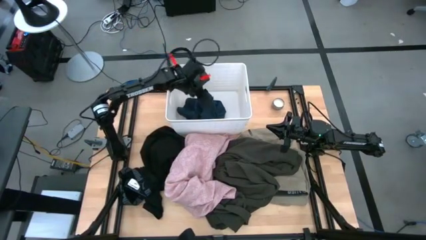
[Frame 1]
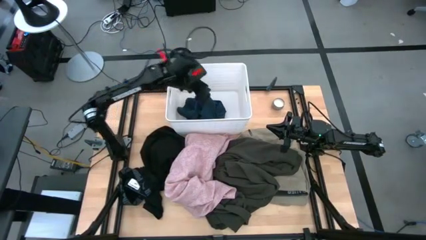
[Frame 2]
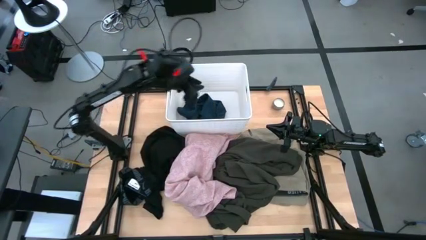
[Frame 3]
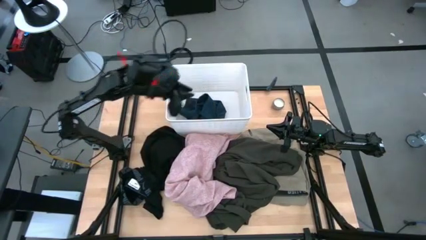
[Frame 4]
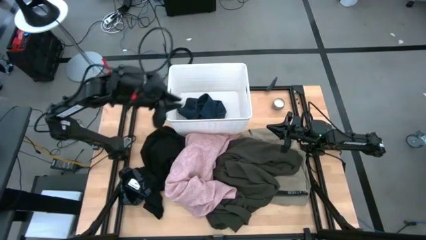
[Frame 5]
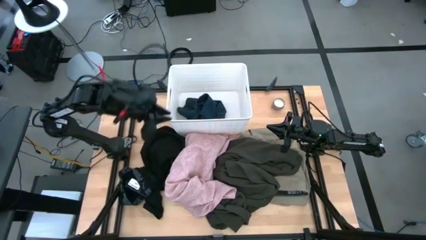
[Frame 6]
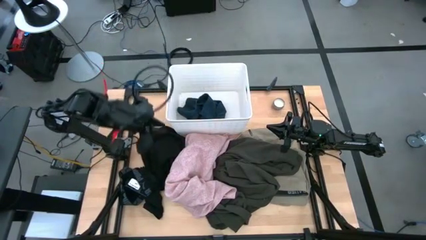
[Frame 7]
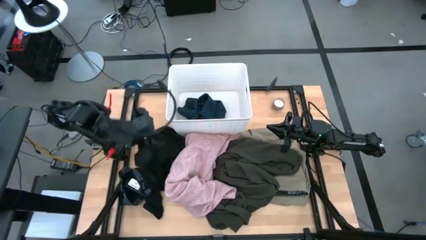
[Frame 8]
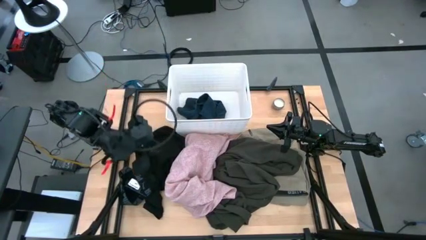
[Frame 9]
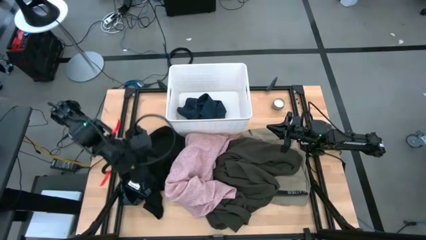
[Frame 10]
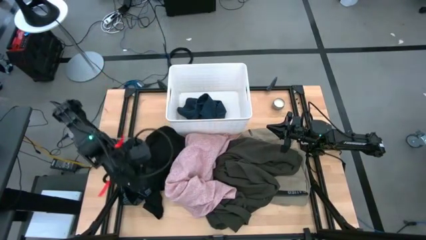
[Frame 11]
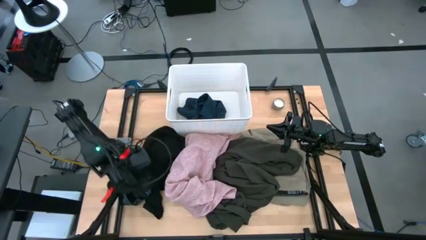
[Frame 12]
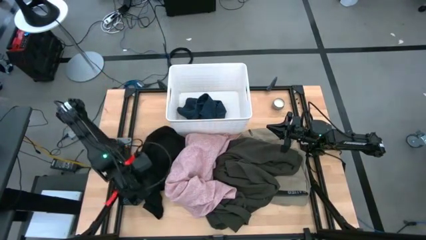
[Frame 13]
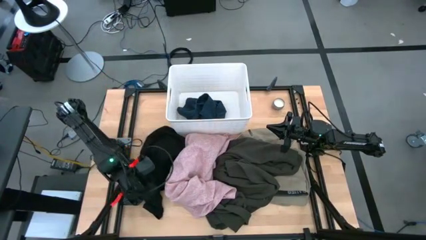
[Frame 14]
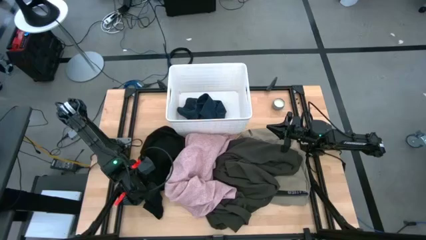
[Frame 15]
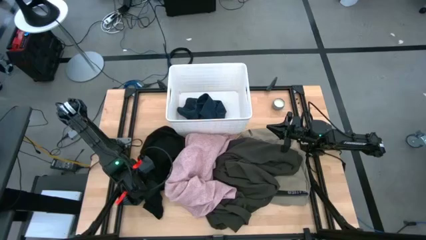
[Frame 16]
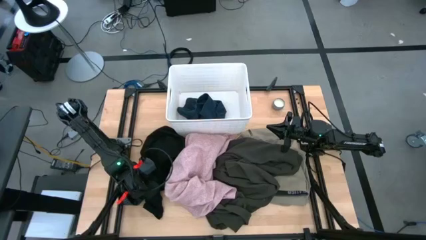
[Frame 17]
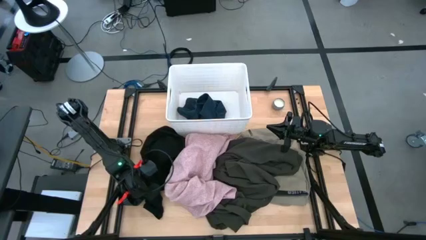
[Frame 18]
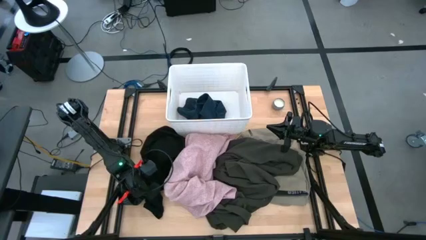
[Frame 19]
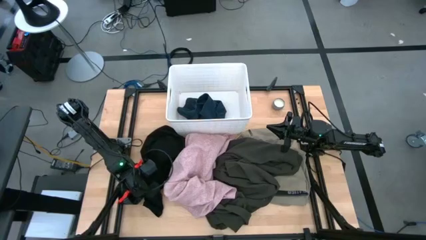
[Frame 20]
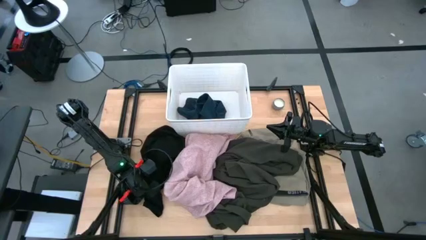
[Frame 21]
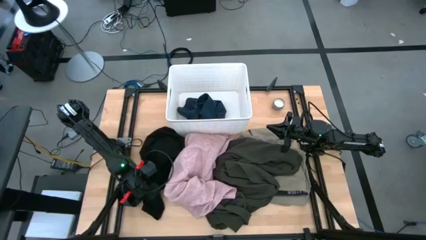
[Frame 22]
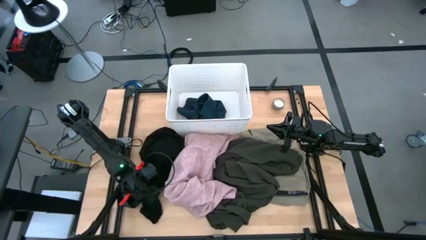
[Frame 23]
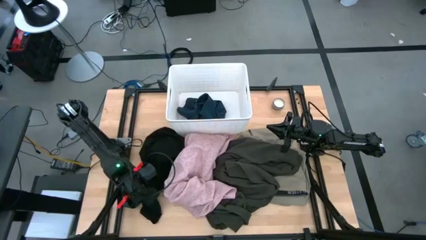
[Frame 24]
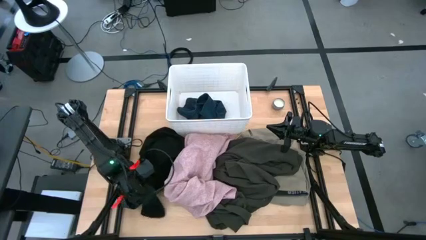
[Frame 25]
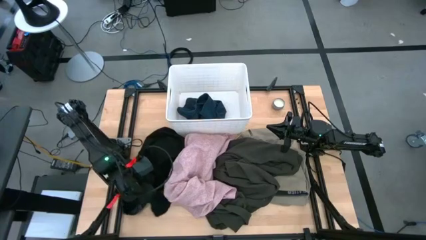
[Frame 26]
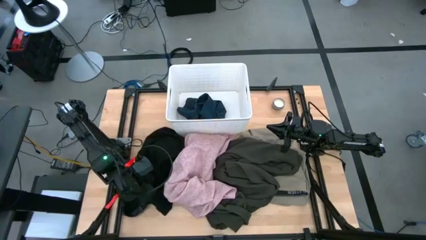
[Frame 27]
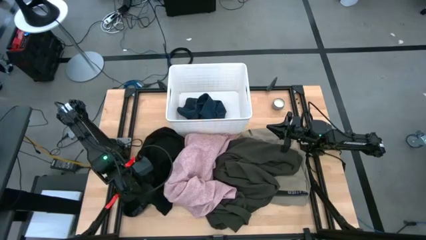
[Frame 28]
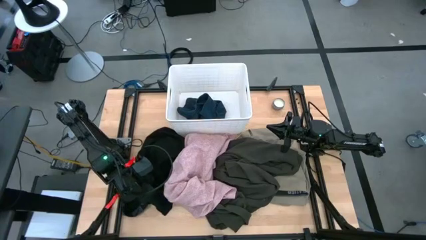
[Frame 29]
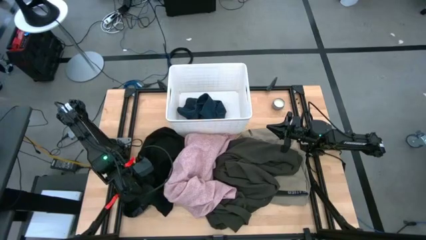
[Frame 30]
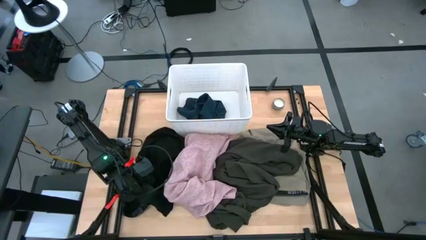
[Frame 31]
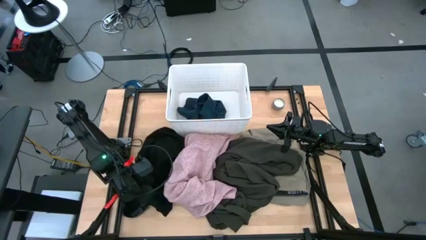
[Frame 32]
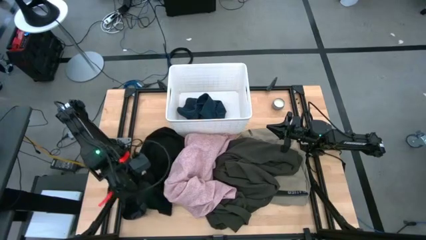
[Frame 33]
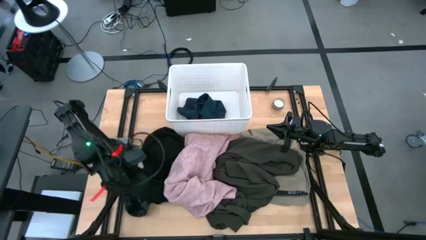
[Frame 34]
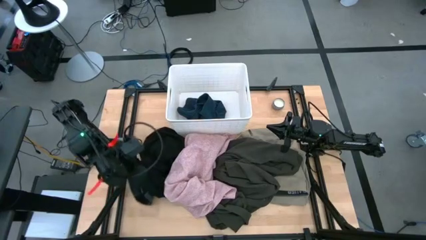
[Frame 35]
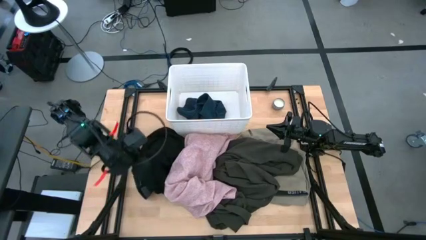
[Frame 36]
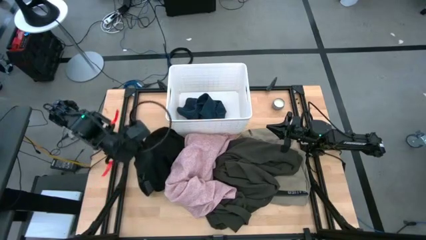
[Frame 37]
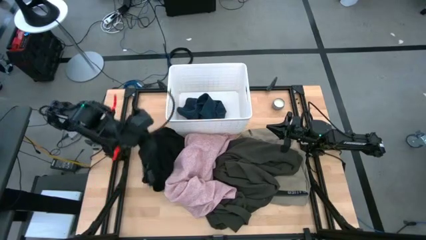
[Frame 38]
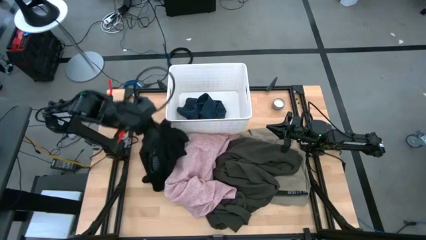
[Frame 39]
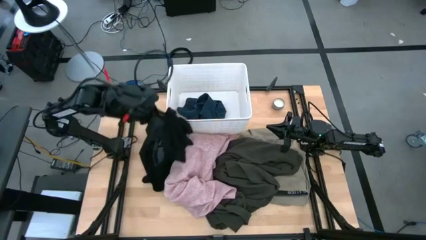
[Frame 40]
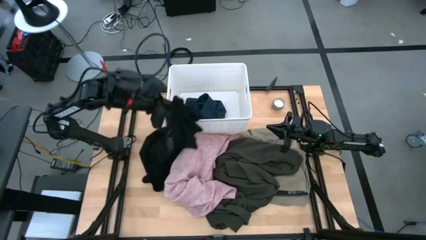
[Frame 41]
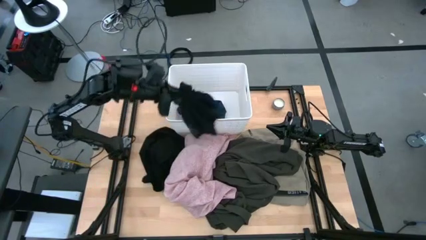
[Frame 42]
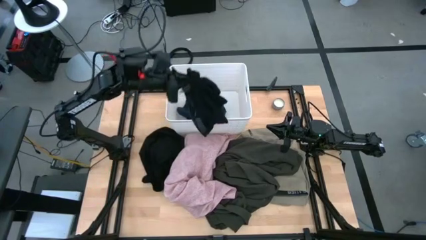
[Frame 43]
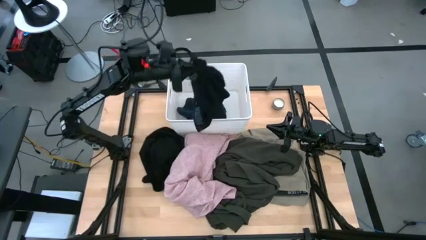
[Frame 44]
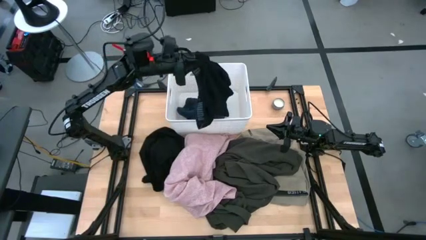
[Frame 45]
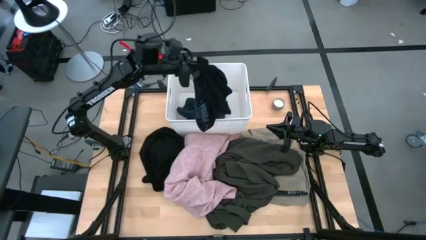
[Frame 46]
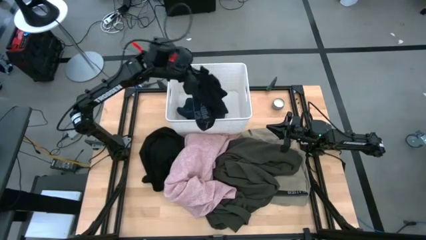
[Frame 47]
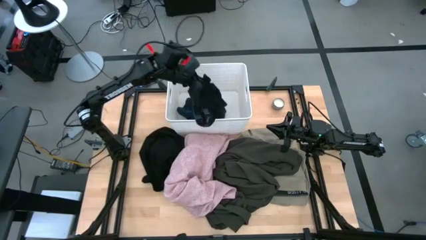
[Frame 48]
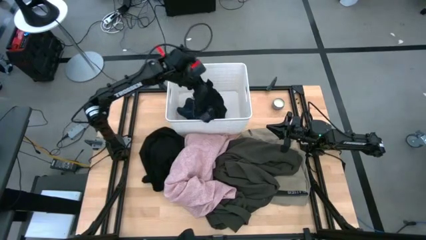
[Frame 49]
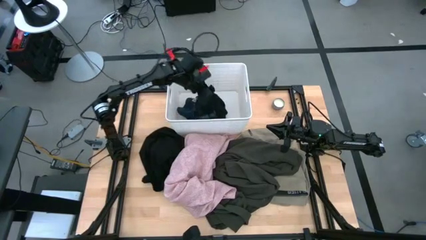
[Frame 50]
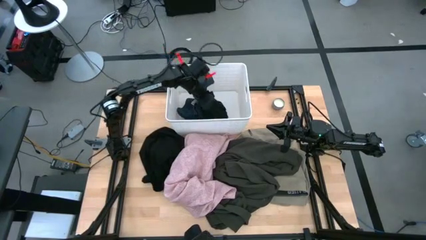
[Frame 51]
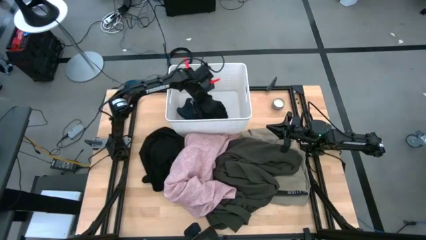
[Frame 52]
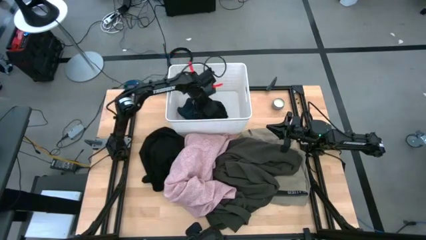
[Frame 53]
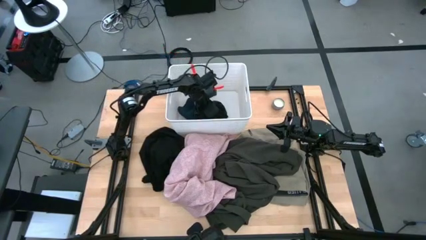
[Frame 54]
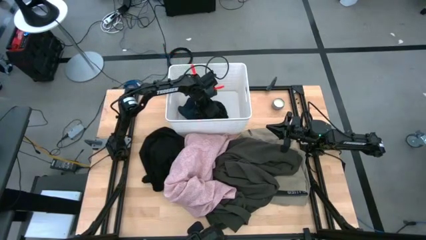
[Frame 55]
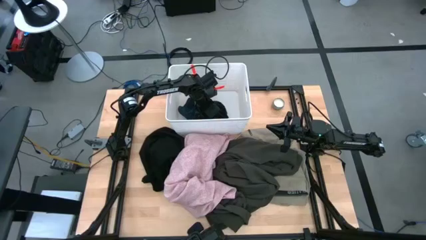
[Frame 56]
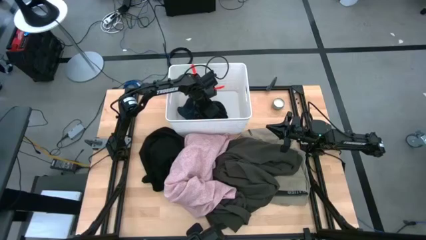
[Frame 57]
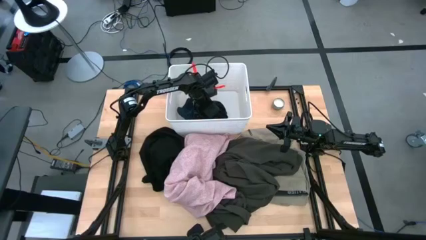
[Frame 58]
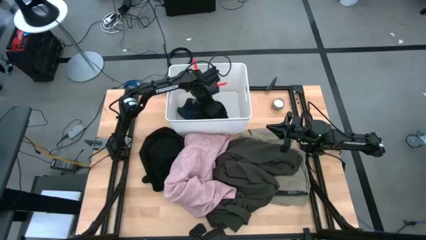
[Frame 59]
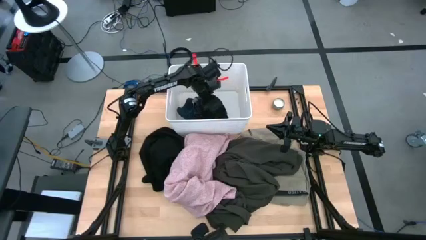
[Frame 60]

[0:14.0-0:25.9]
Task: Sort clothes
Put the black boxer shorts into the white laundry organizer
